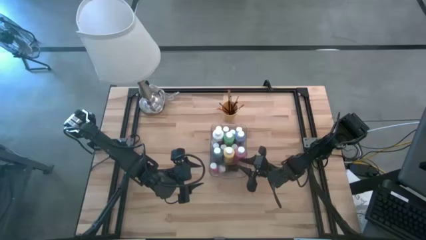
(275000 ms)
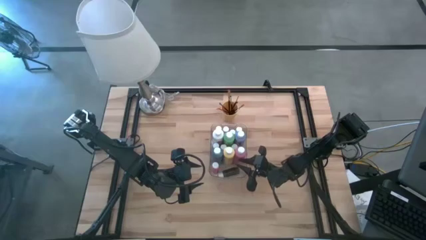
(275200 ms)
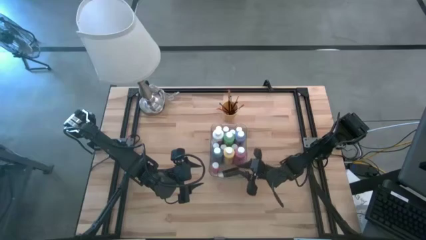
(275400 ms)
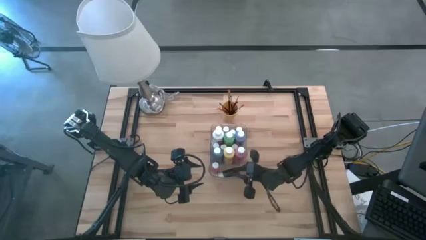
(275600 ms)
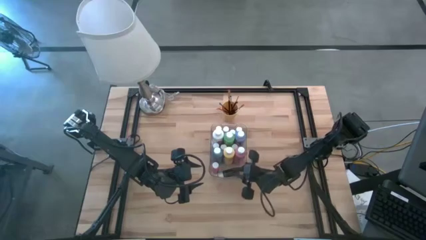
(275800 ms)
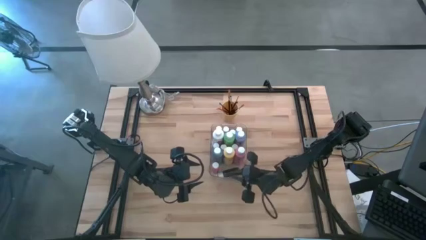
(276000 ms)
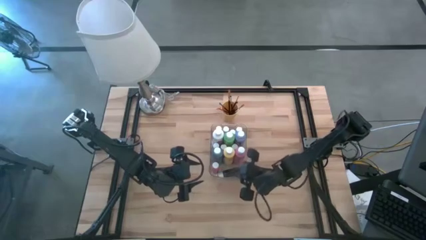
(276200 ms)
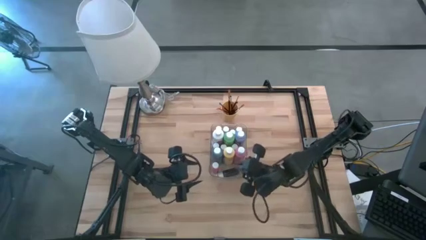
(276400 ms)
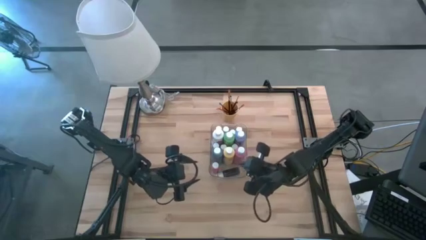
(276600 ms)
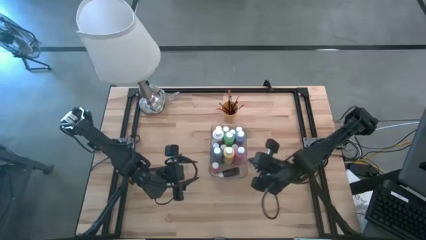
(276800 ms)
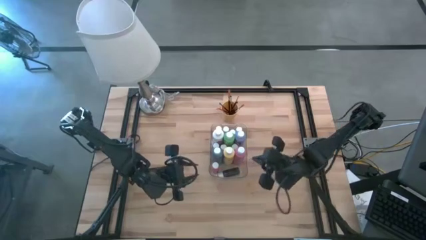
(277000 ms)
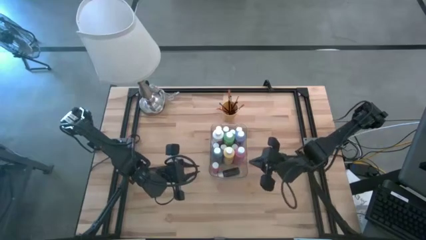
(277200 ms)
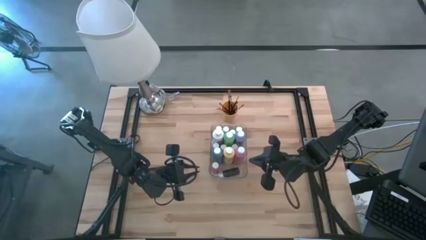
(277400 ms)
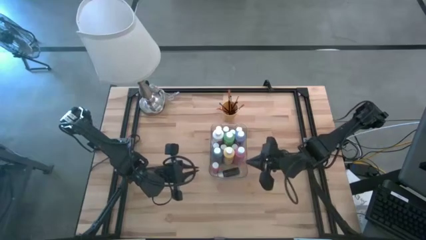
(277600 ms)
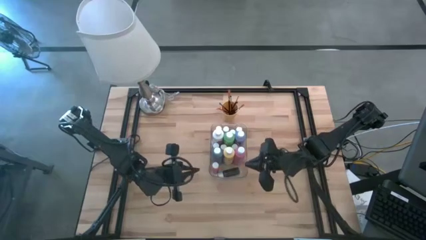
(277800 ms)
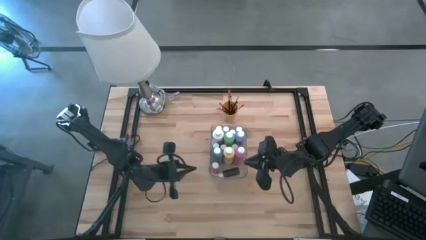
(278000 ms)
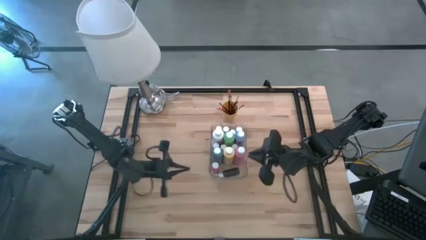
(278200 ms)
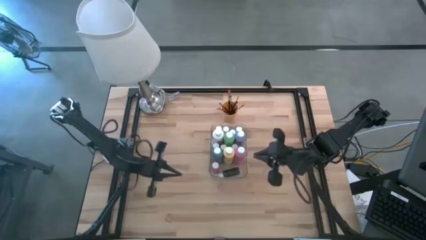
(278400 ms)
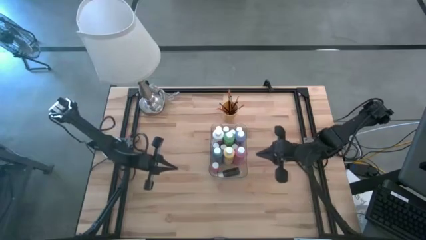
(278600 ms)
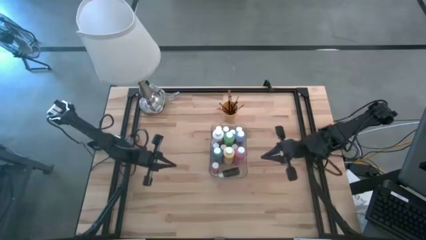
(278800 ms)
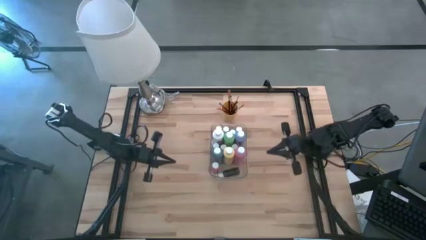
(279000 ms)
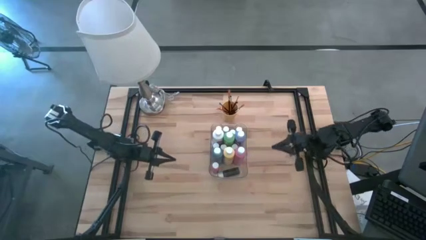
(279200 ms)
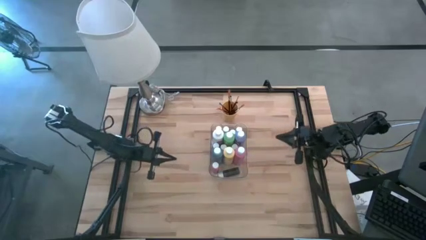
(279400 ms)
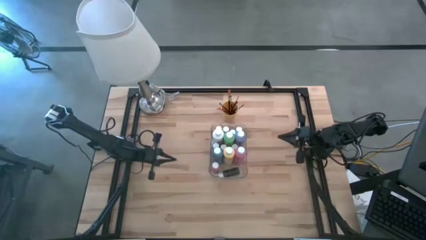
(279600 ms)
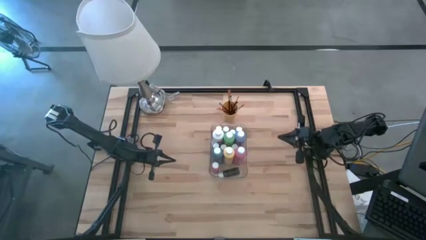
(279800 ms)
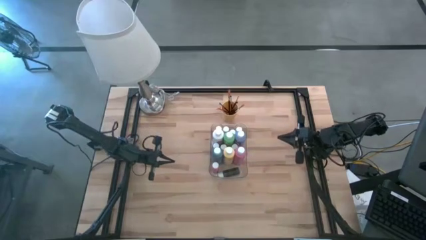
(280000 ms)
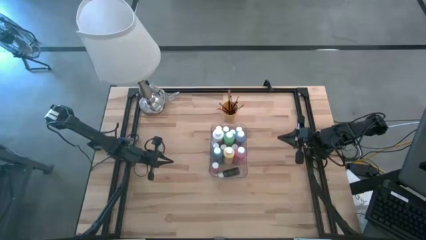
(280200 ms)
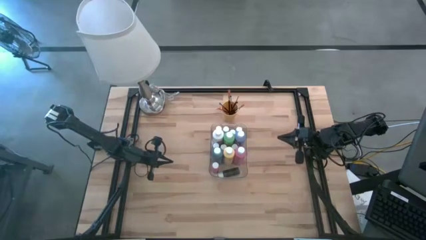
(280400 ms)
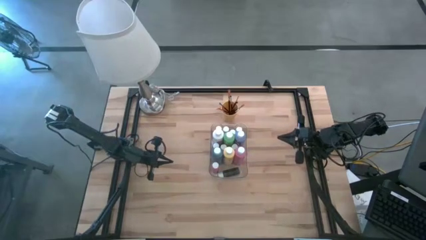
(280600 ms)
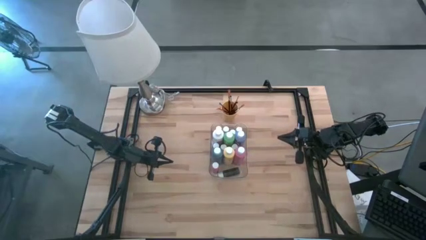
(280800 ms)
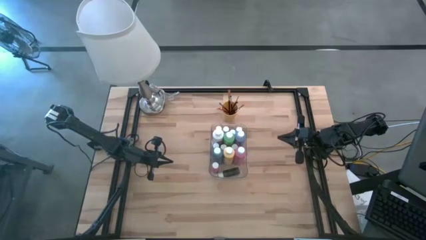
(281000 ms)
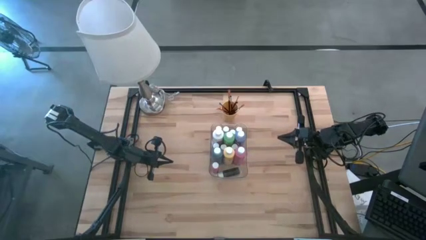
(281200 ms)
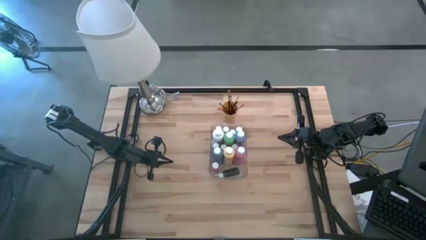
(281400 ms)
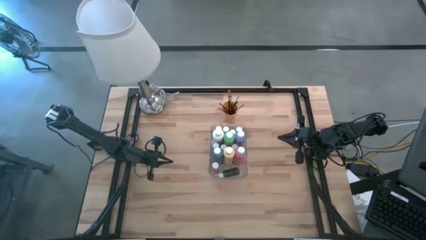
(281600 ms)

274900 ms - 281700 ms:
Task: Pick & Place Paint Supplies
Return to Home Position

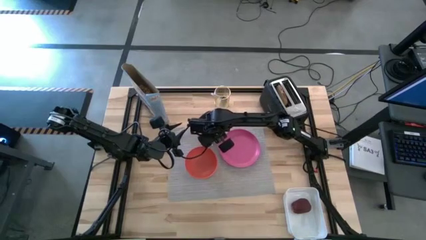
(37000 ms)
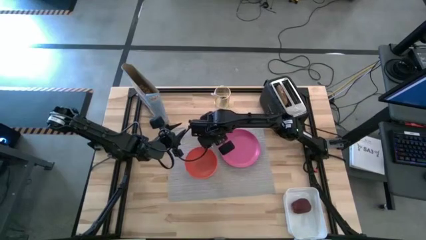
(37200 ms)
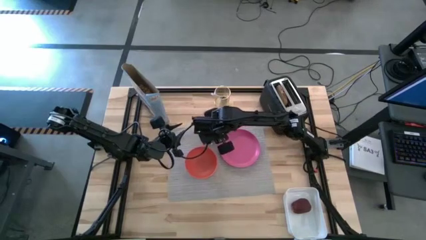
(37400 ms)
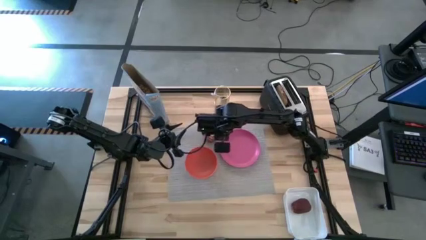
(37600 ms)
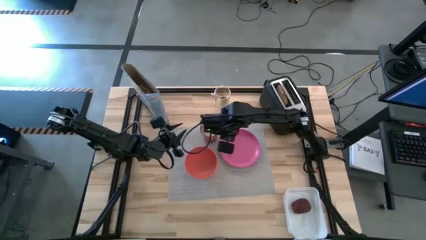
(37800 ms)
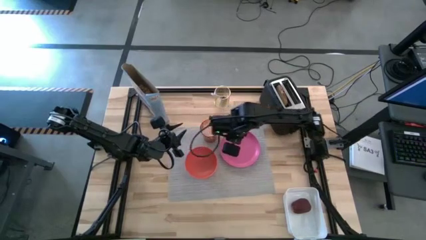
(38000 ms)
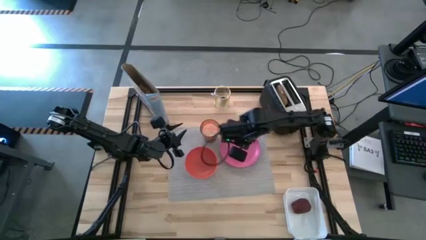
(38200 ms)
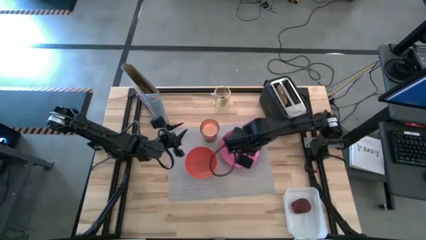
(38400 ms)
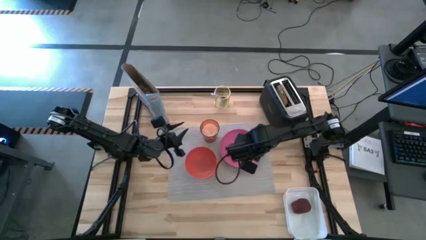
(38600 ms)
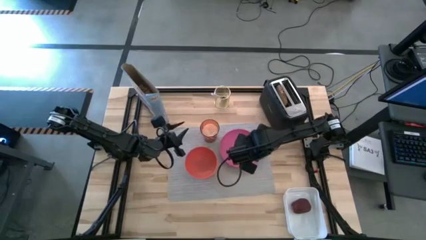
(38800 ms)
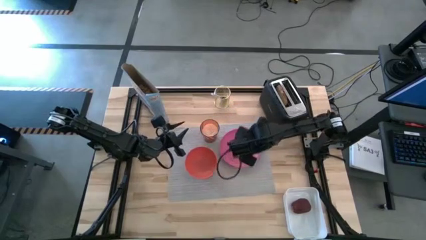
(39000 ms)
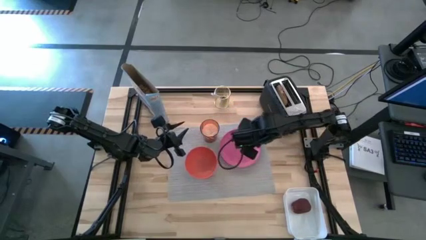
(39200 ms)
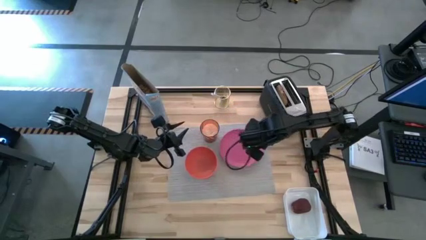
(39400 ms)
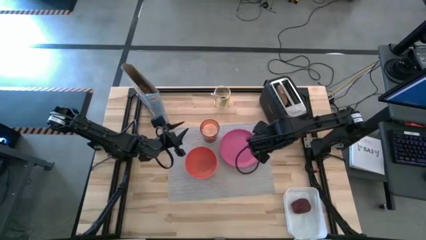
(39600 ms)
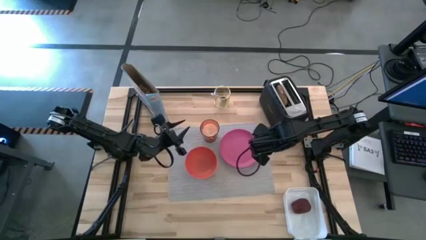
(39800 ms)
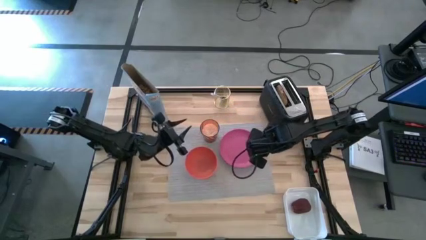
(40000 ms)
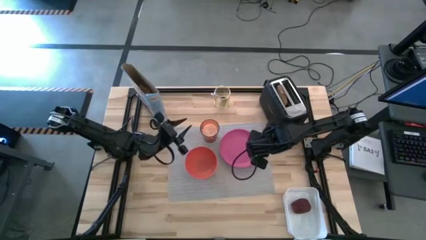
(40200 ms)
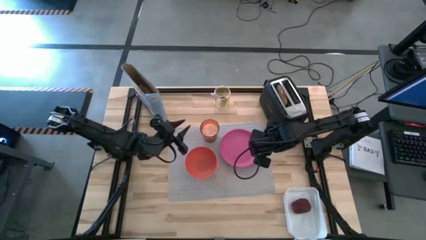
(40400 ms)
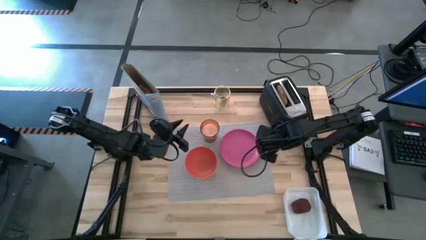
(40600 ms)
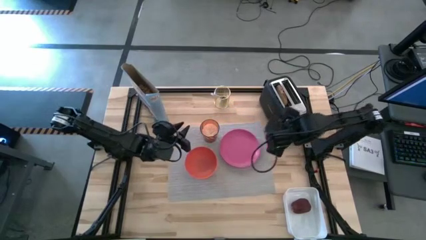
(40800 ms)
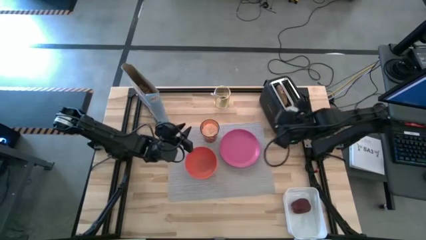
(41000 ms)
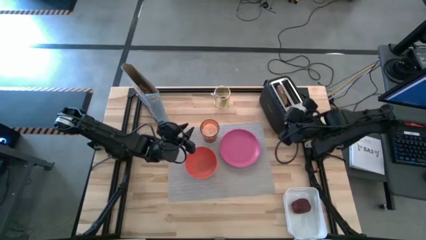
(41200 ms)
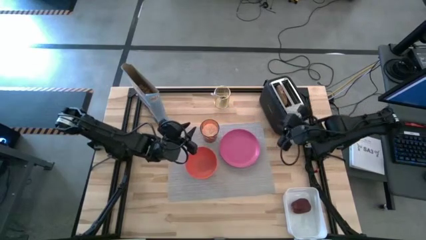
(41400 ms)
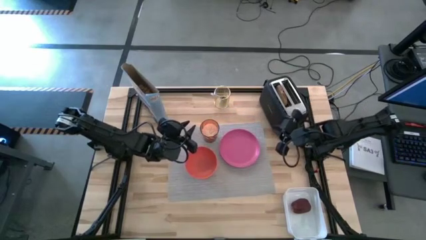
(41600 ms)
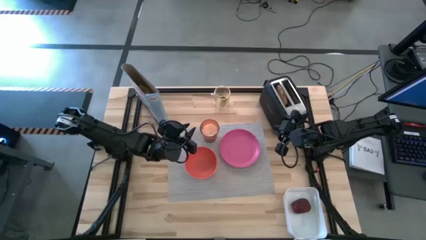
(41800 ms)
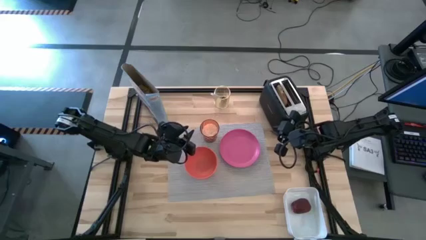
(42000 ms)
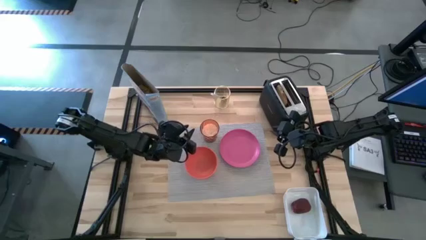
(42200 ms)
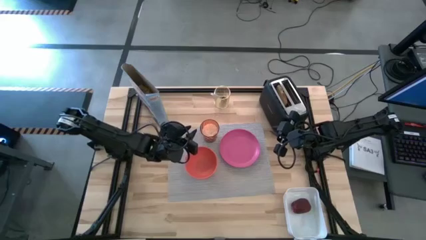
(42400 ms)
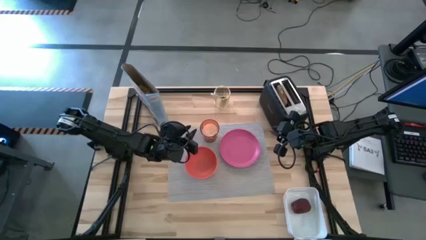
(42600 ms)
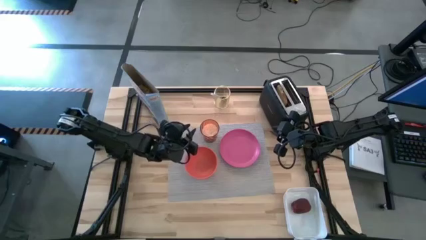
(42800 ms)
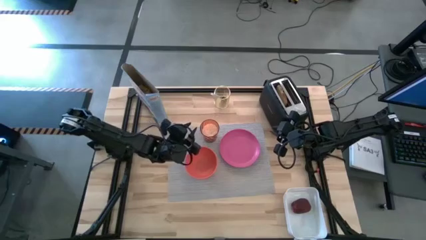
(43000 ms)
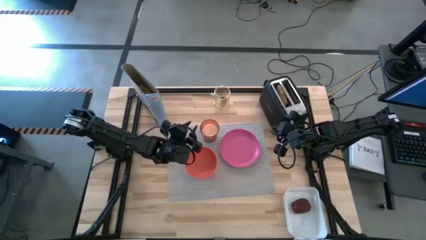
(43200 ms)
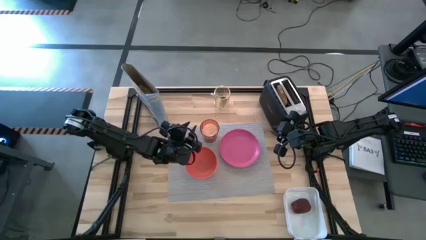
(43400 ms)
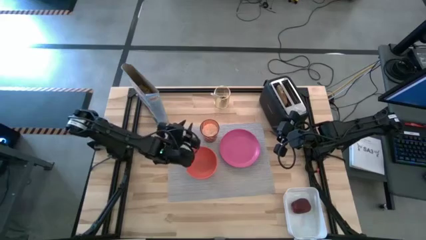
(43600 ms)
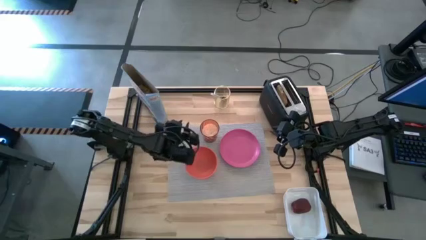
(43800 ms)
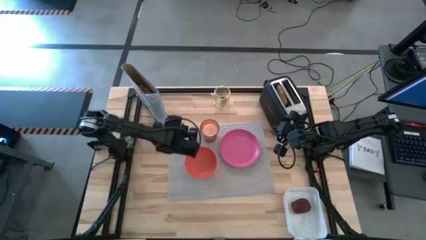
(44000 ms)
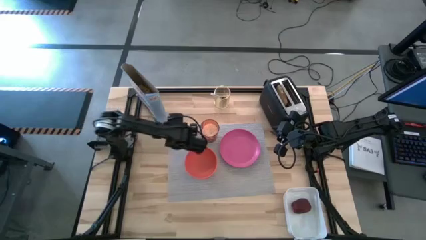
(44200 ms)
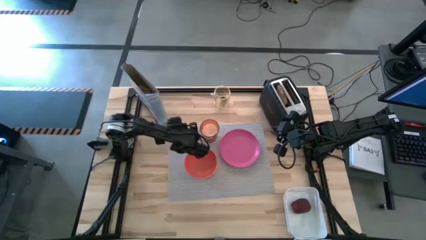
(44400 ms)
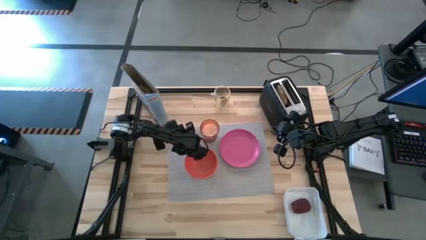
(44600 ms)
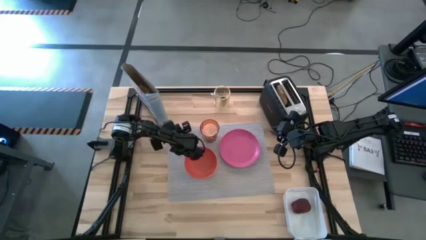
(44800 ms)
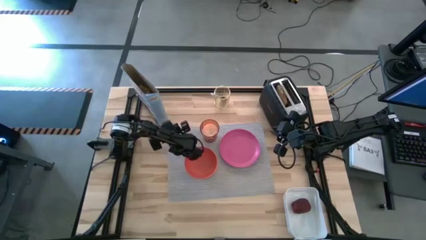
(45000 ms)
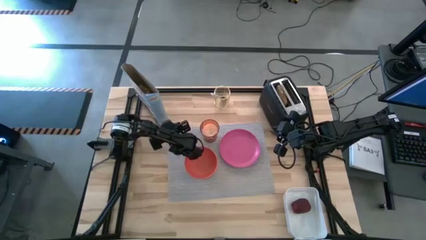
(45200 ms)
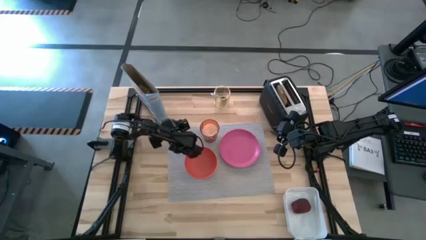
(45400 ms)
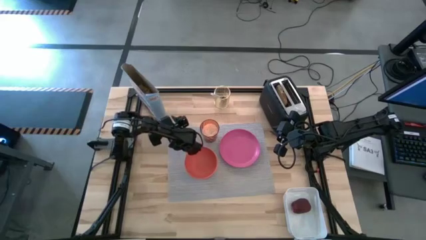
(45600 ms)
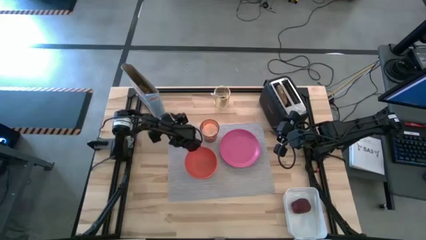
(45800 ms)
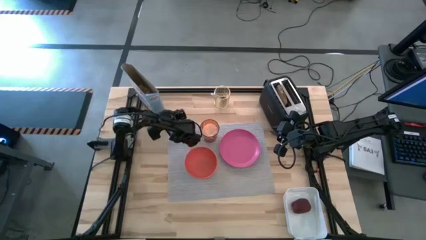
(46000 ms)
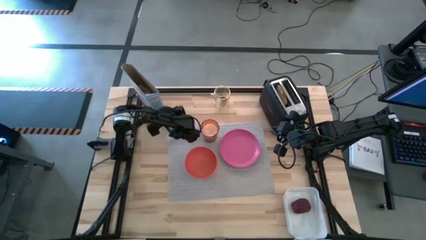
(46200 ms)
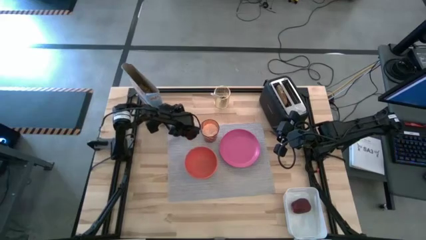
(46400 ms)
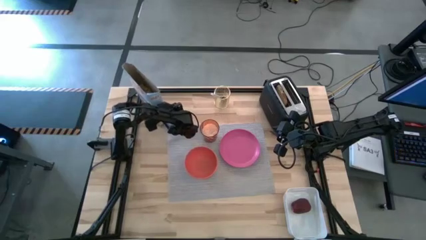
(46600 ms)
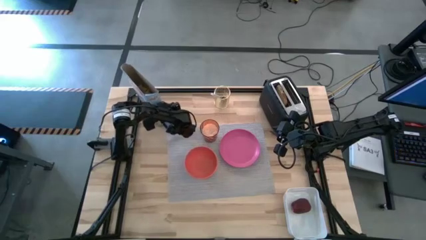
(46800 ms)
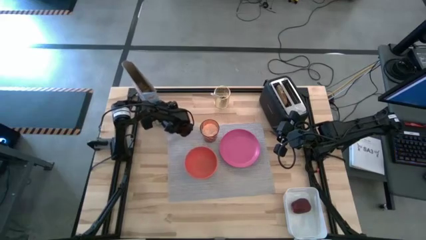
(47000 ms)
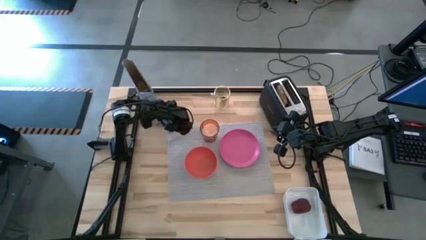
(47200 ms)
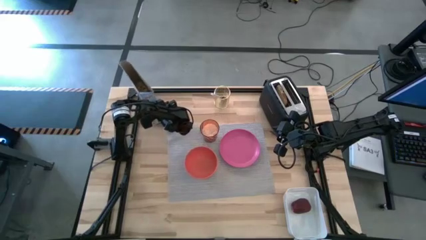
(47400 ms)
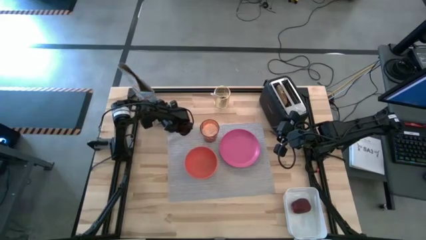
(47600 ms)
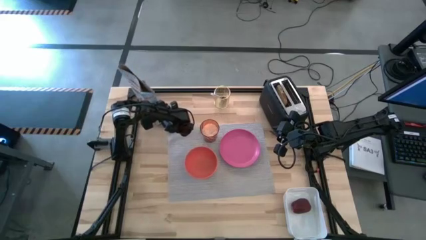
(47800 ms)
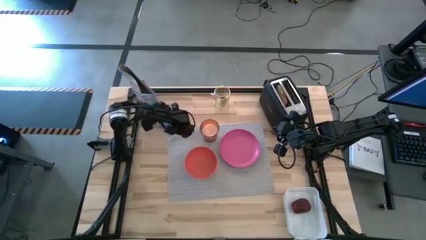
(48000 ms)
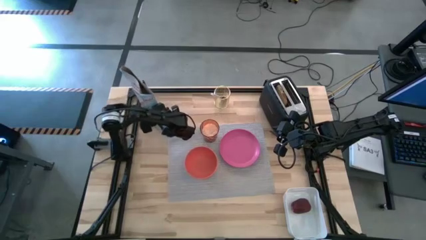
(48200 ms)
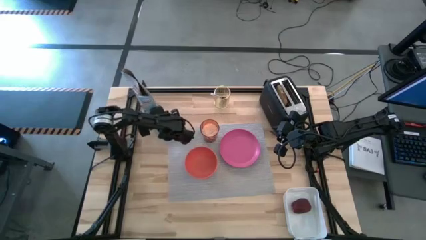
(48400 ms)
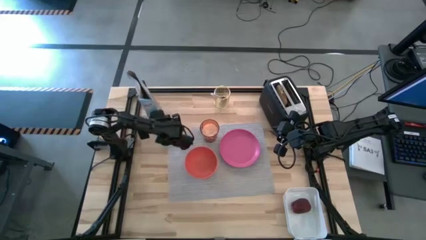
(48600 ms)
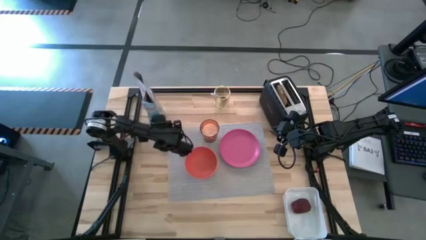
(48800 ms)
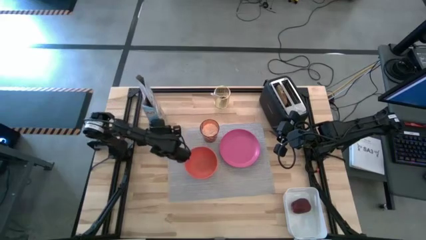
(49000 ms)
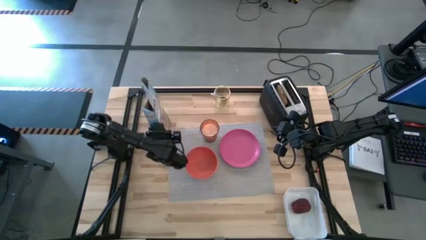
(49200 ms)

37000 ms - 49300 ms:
Task: Arrange a breakfast setting
Pour the cereal from the blue cereal box into the orange bowl
